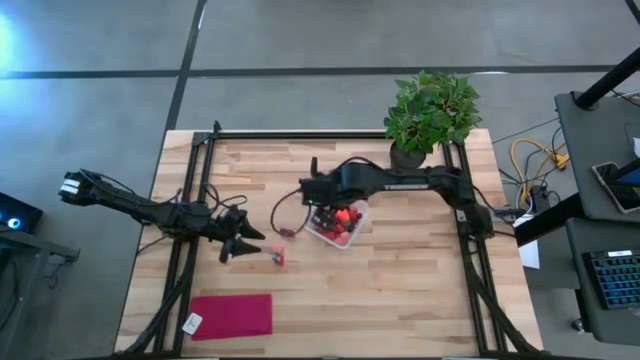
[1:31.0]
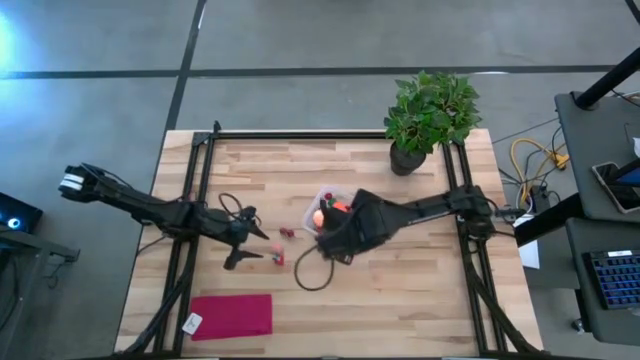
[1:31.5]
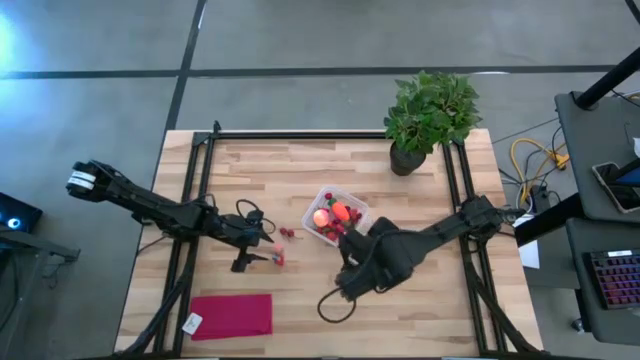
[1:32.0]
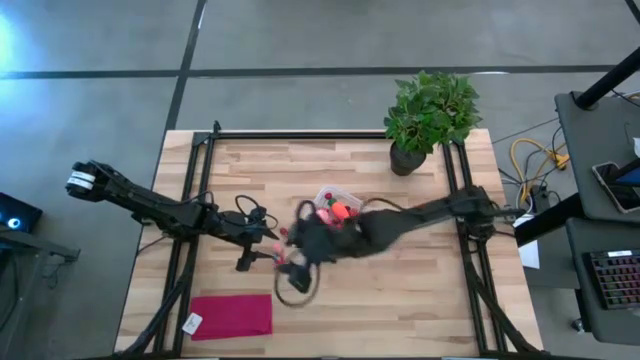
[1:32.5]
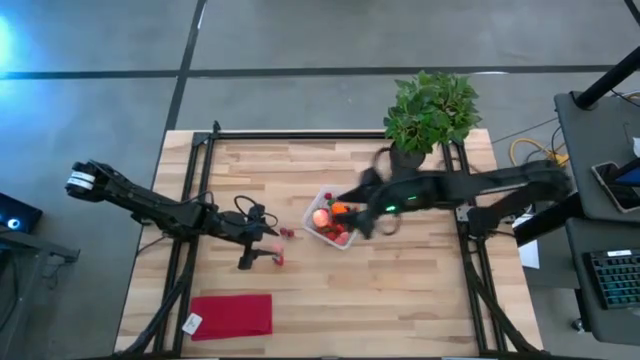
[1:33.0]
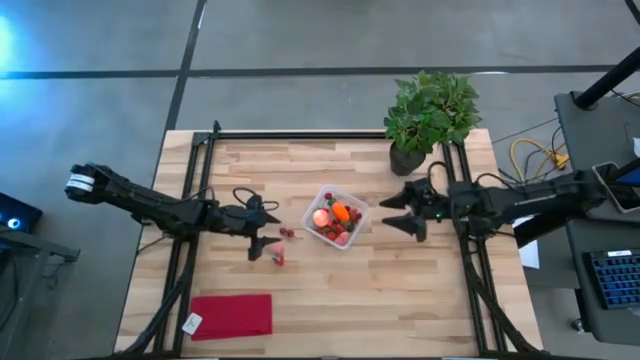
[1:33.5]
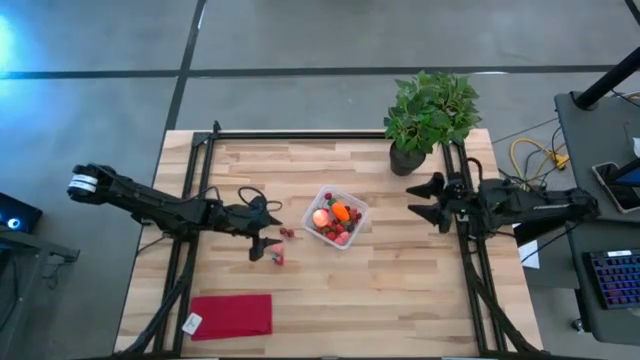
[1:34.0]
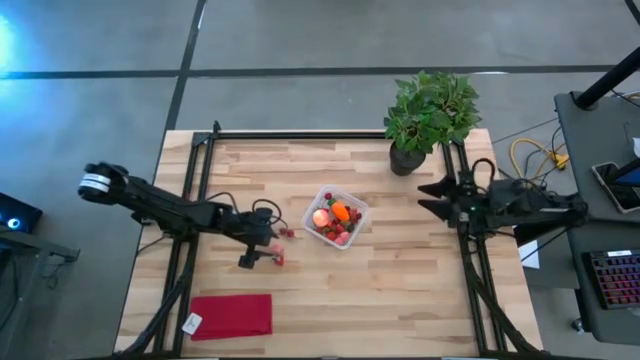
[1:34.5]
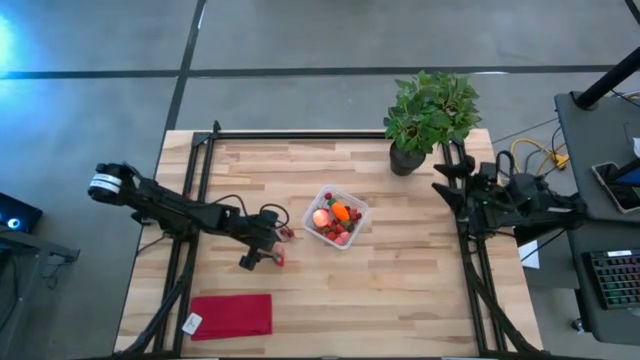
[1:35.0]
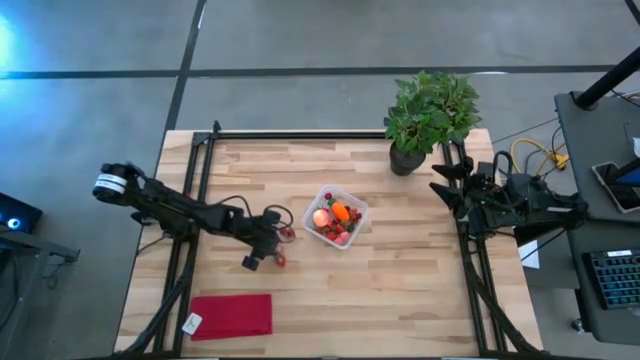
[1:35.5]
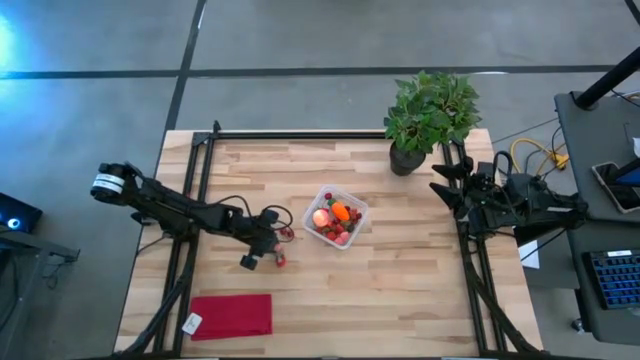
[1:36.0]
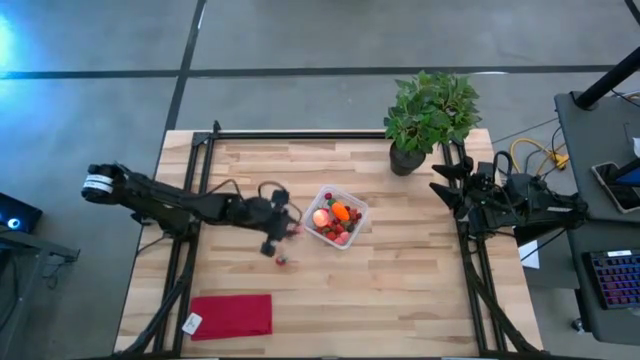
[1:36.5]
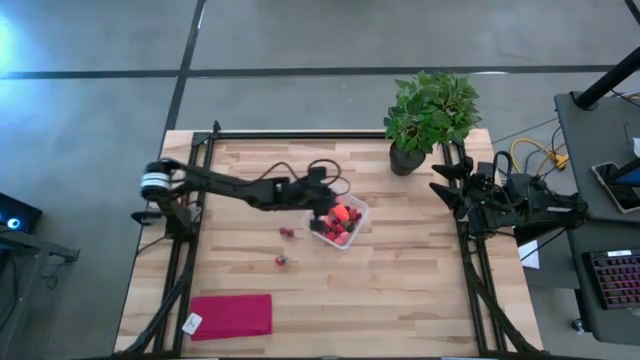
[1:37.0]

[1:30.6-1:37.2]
Task: Pick and placing Produce into tupperware
Put the pink peach into the transparent container

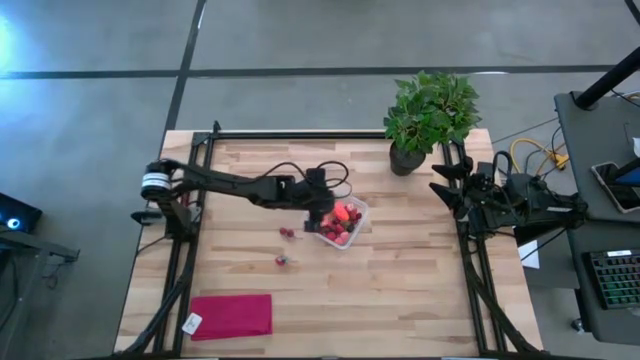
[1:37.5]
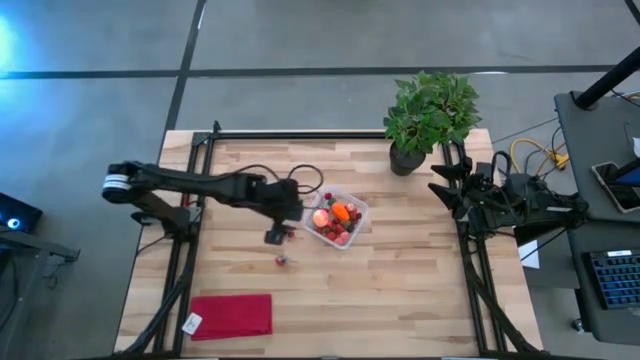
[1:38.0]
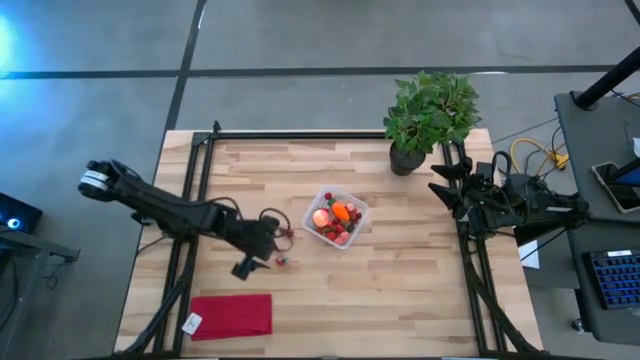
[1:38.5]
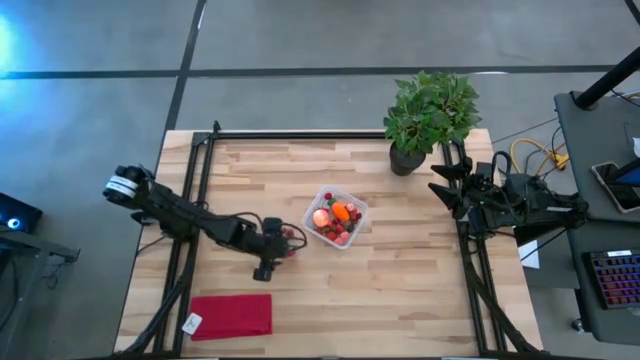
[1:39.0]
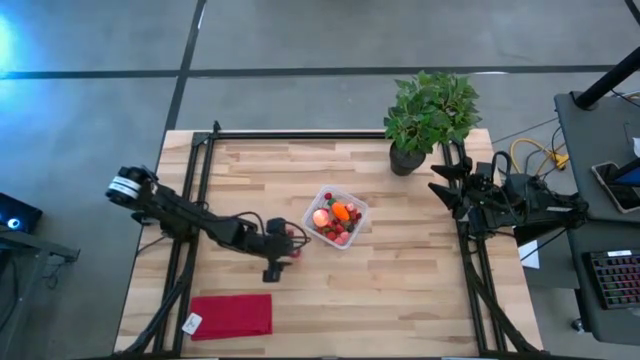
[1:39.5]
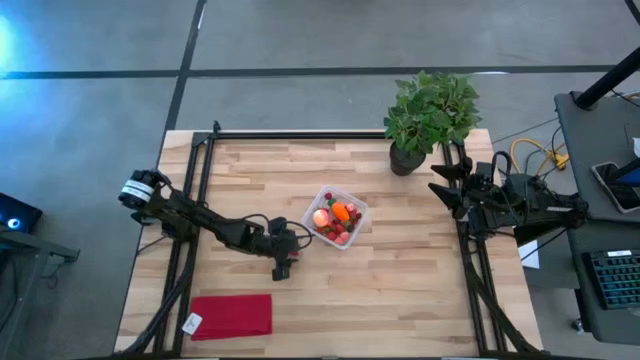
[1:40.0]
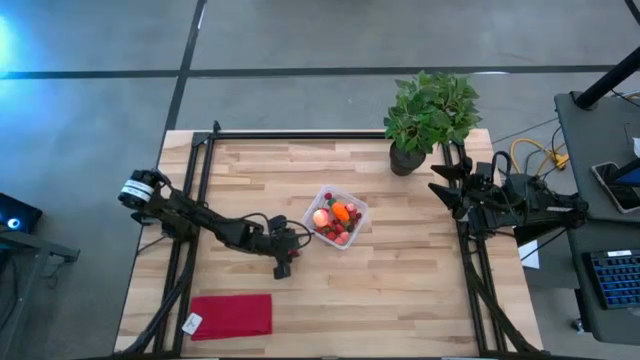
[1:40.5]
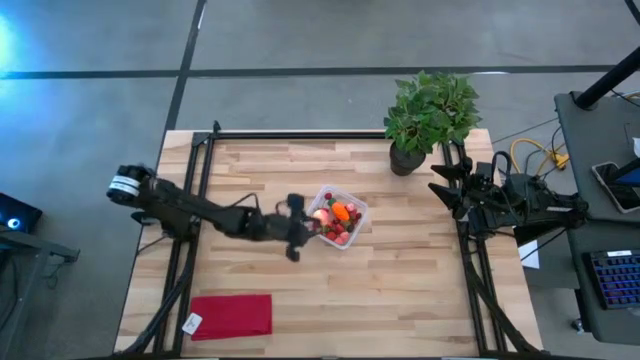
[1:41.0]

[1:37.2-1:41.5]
Put the red strawberry into the transparent container

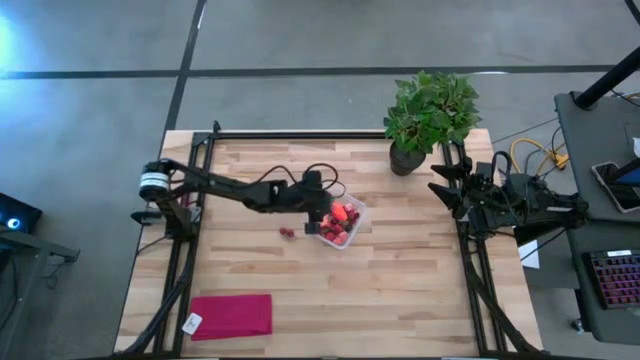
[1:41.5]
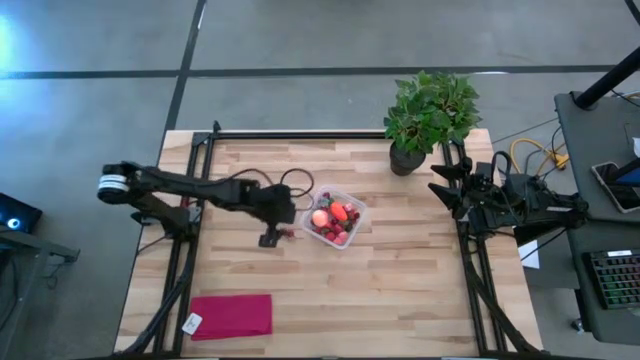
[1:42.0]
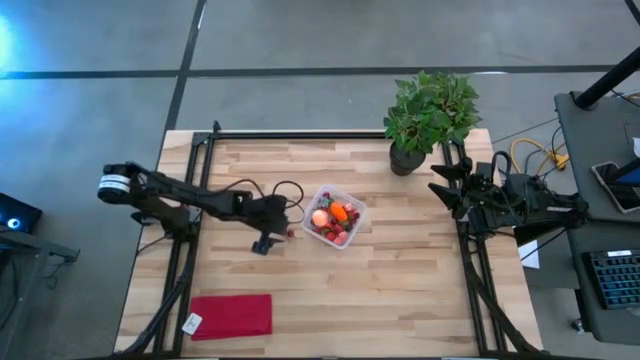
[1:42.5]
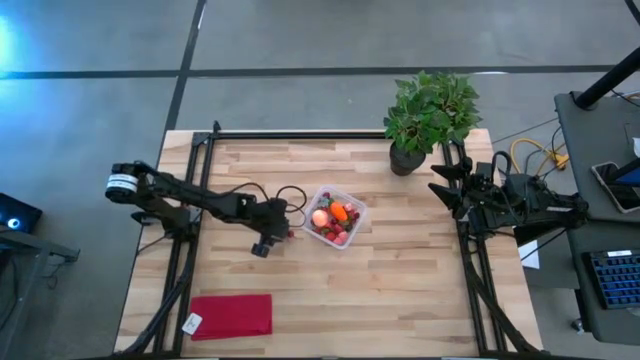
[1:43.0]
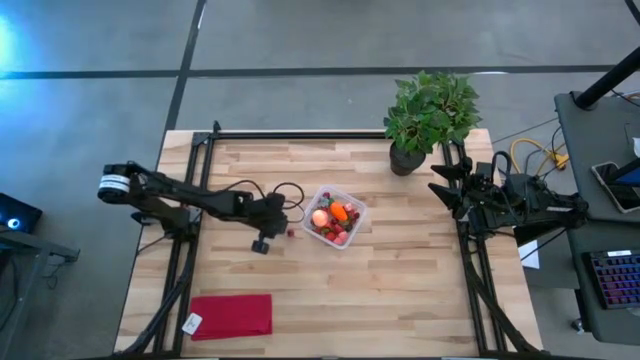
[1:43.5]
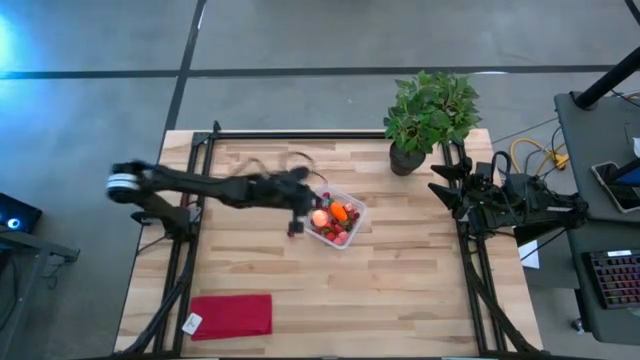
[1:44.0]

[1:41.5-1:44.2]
Put the red cherry into the transparent container

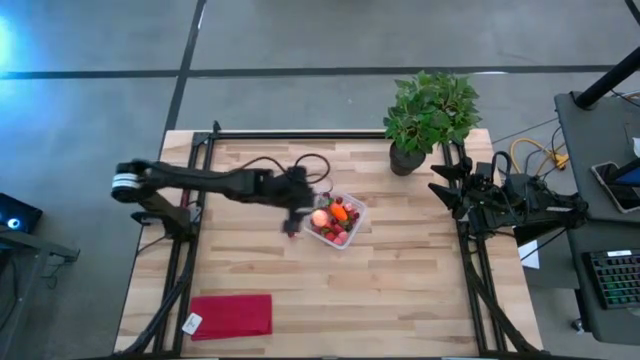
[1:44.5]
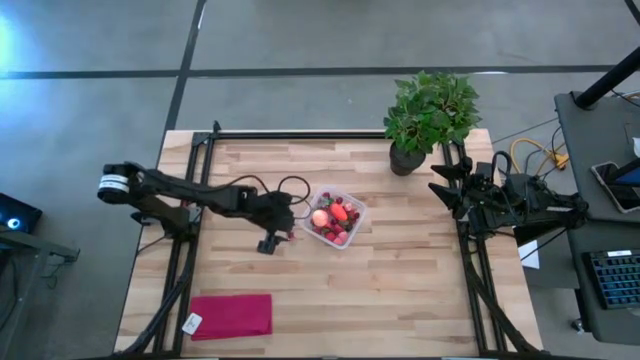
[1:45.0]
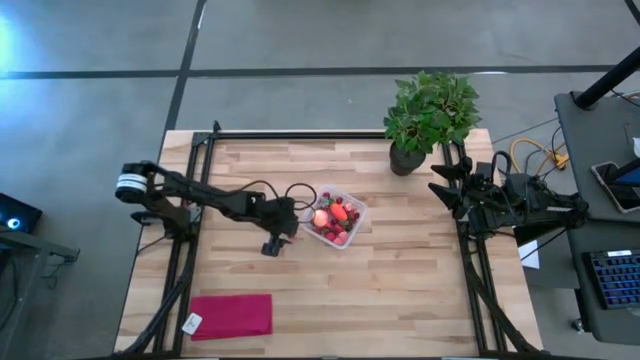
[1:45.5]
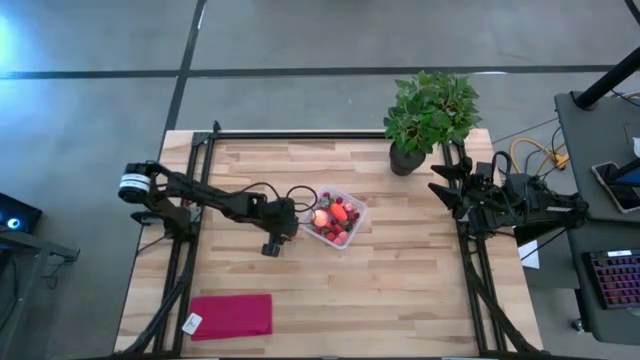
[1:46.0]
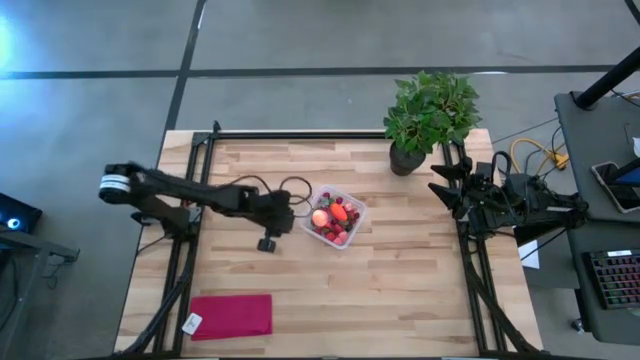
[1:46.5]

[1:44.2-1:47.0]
Put the red cherry into the transparent container

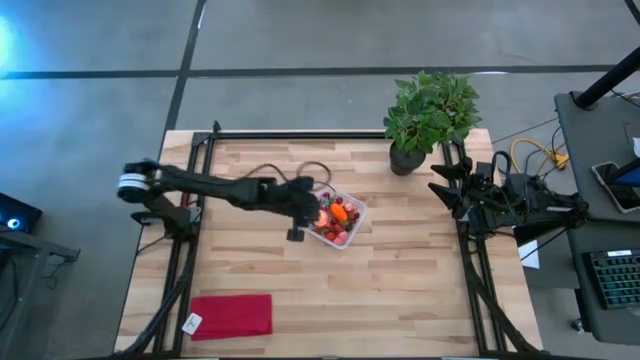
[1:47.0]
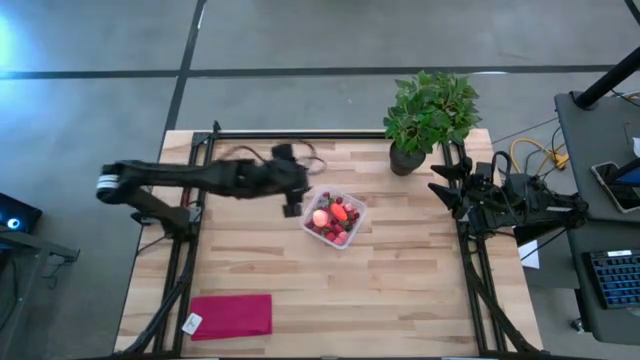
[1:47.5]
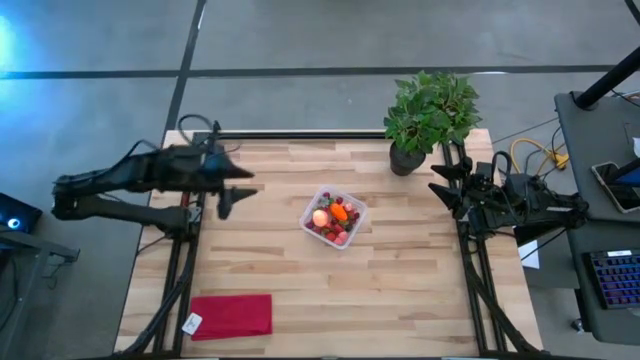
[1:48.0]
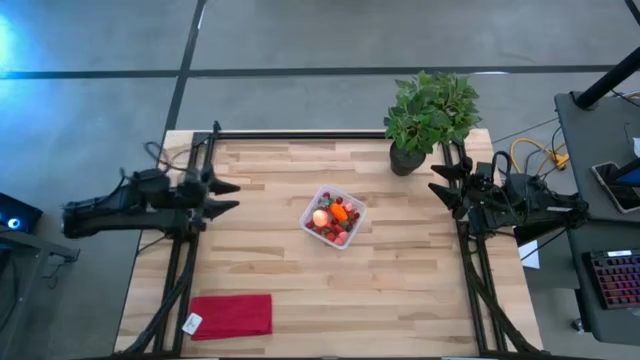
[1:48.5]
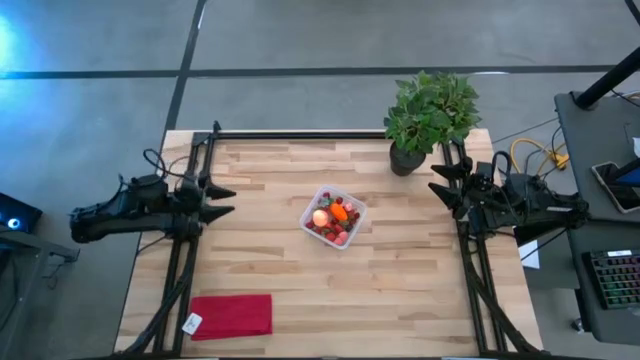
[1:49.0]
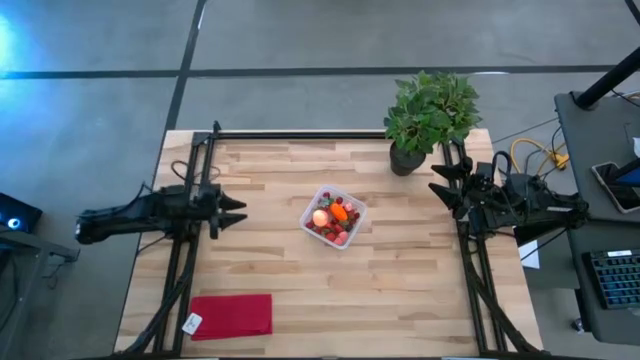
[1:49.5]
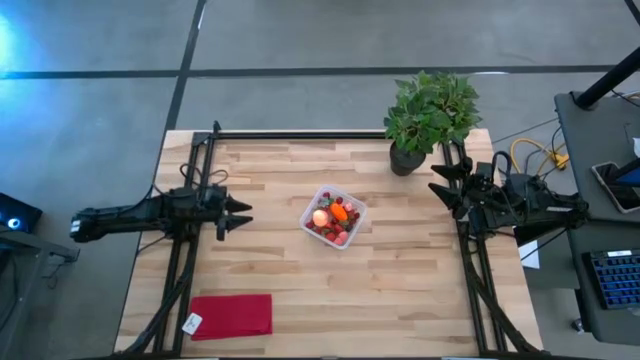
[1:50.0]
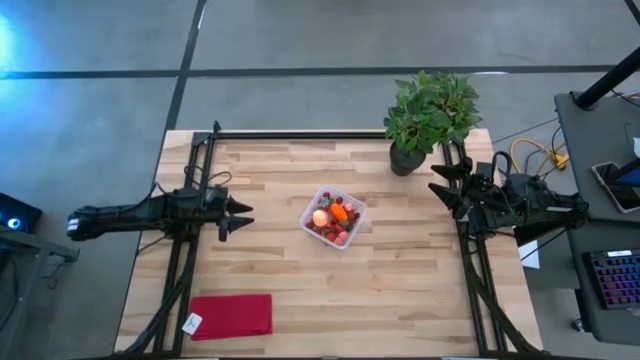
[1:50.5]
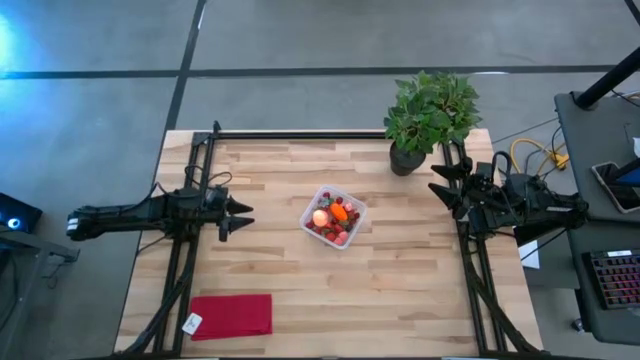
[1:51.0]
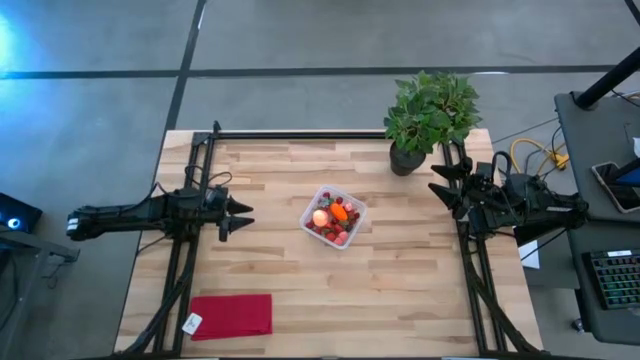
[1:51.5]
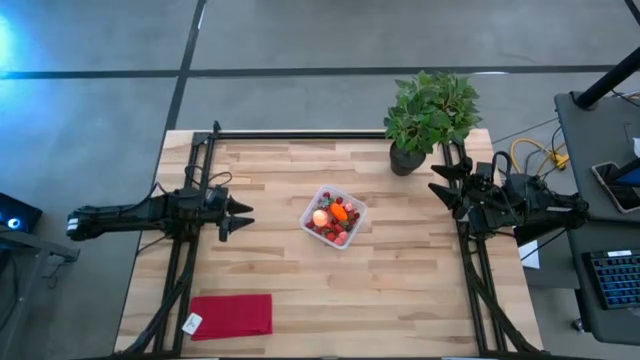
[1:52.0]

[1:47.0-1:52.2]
Return to Home Position
